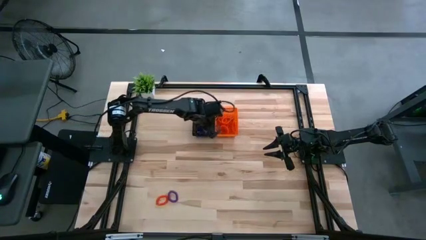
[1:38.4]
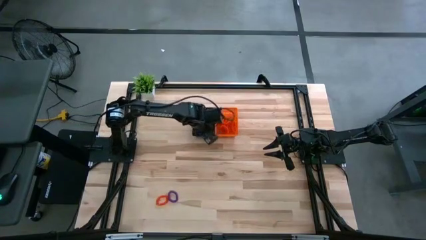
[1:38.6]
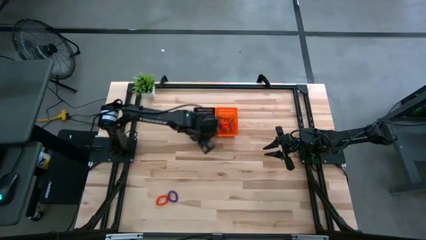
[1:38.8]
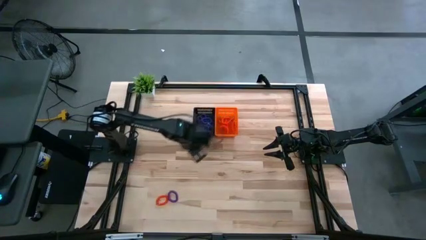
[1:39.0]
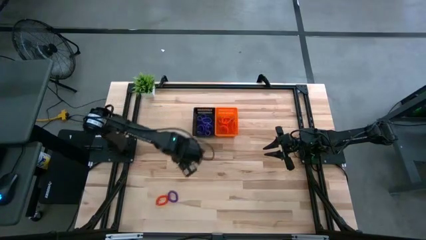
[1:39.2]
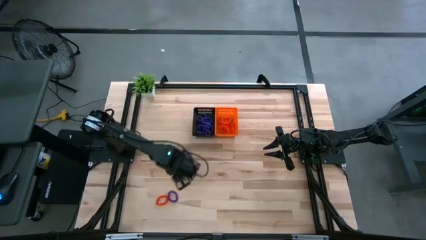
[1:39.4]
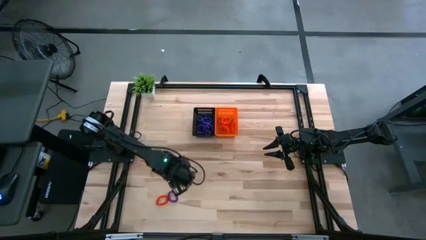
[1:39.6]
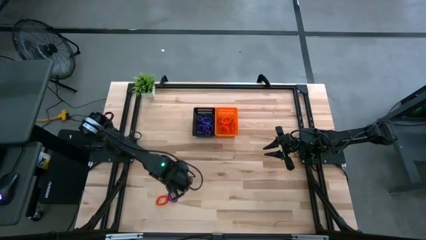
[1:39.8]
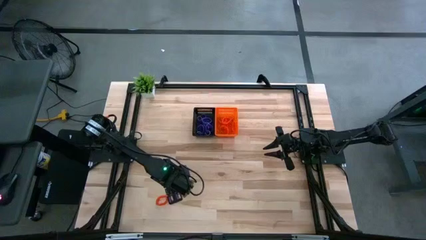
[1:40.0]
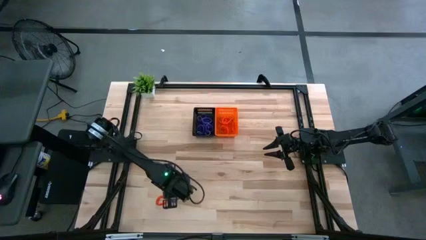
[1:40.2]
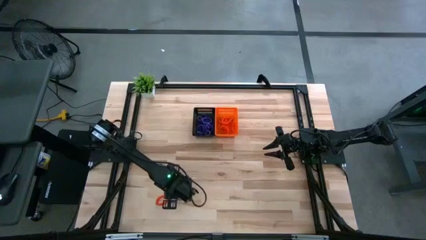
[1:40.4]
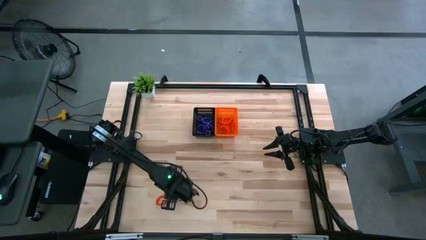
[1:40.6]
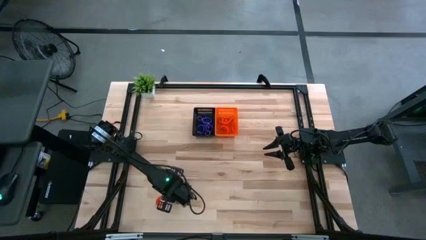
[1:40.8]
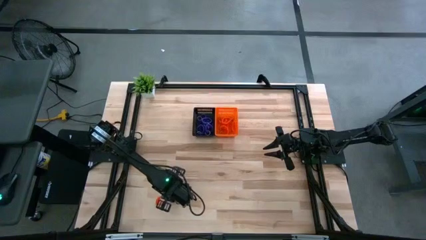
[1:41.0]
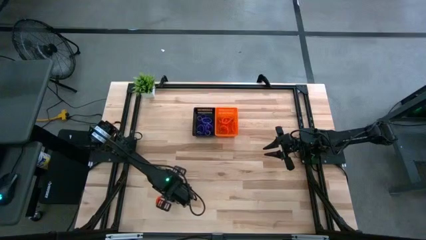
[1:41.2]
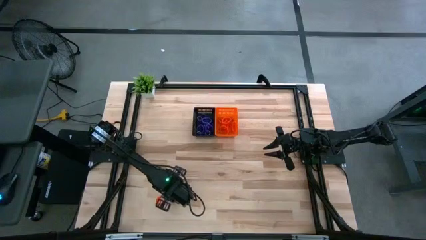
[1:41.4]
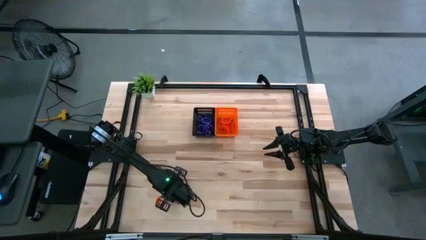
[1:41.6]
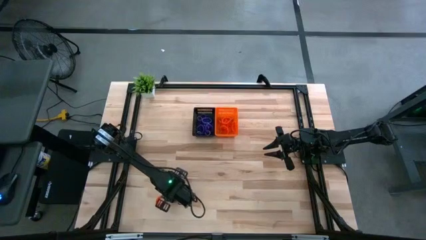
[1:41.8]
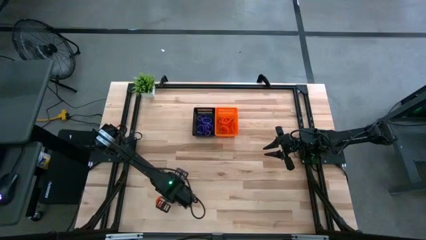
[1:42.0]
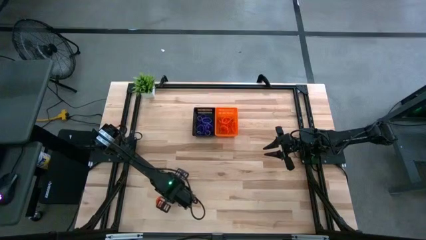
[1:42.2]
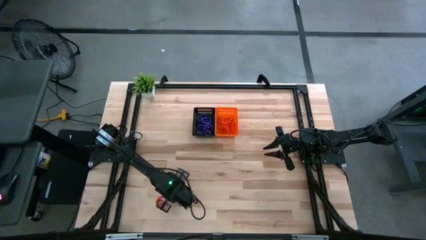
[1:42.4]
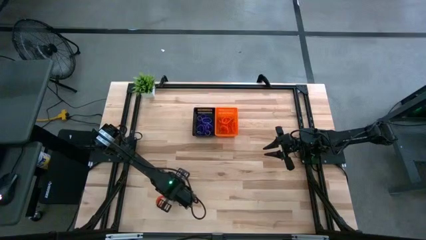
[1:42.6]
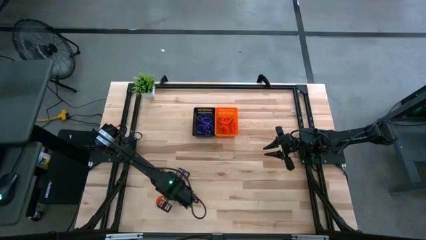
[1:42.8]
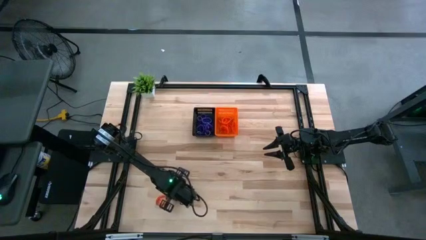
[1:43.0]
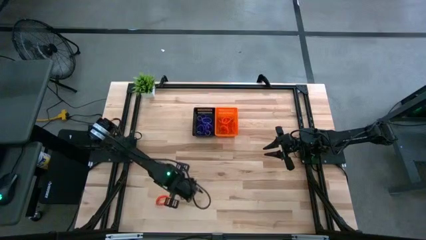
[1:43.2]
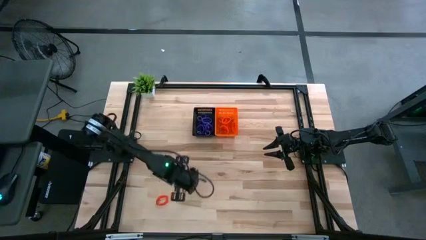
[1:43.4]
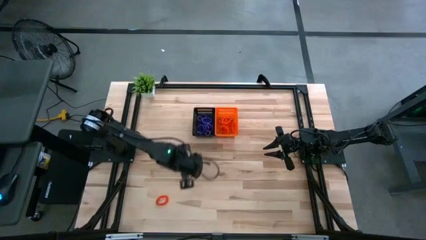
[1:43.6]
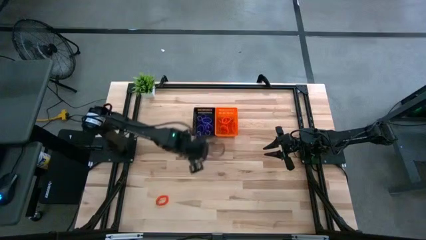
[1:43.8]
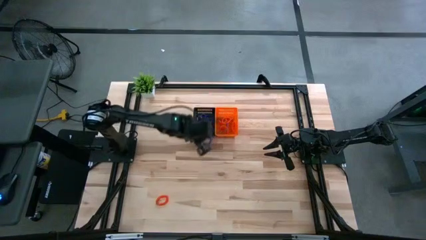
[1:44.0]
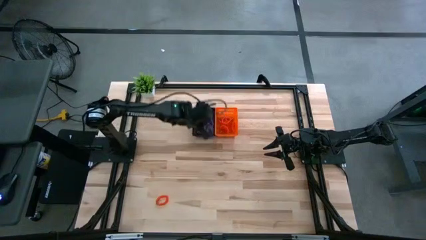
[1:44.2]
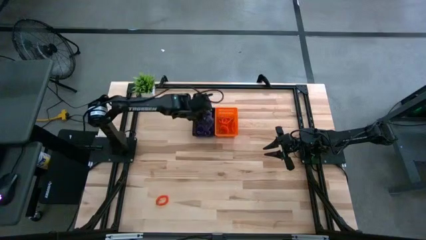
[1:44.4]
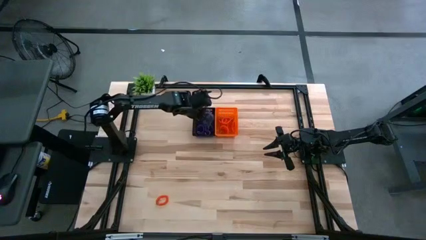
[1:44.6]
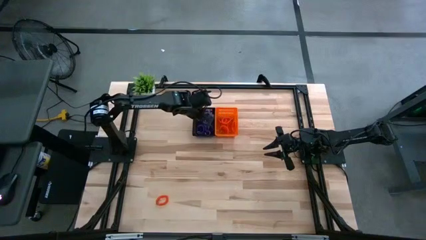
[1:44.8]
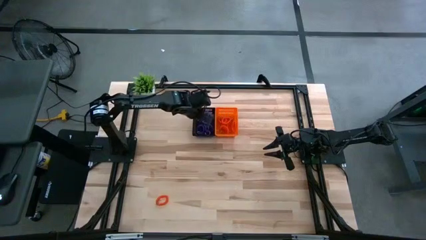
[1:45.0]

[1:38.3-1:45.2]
Task: Sort spring keychains into baskets
Put the purple spring keychain into the black basket

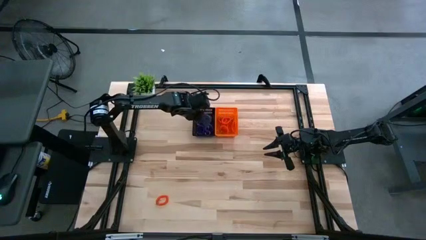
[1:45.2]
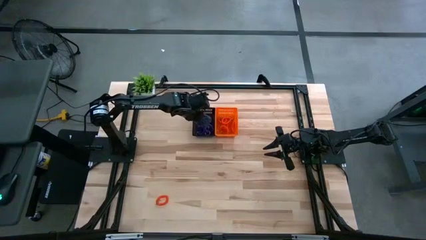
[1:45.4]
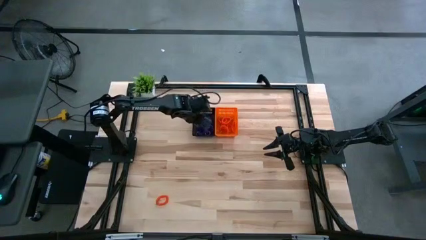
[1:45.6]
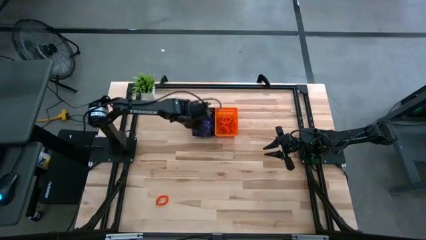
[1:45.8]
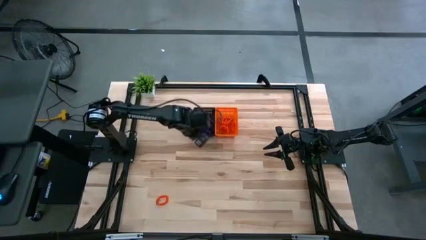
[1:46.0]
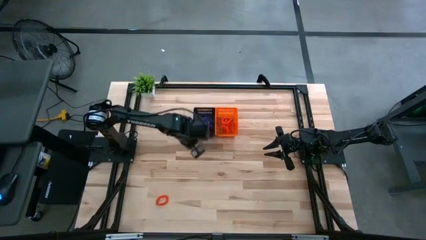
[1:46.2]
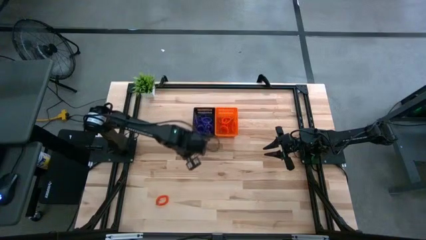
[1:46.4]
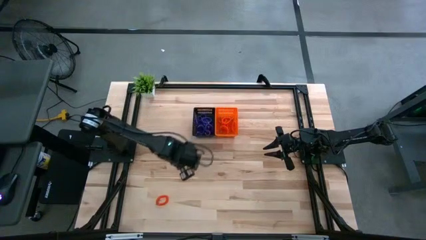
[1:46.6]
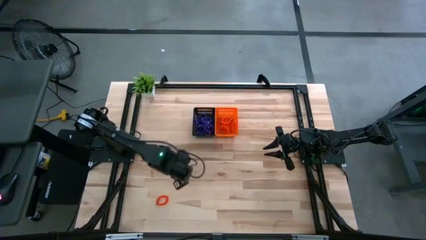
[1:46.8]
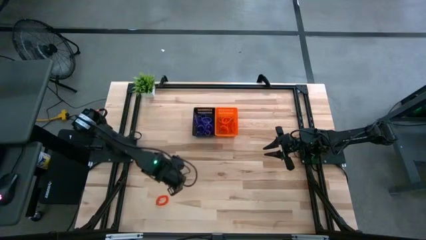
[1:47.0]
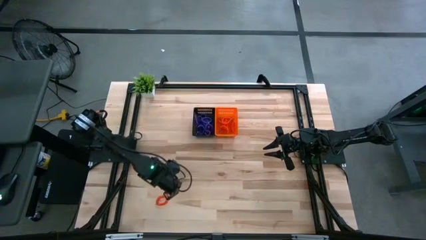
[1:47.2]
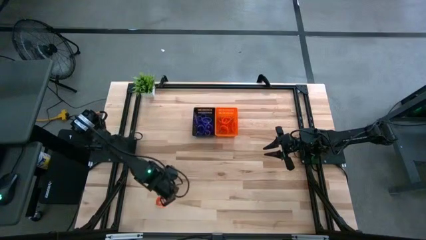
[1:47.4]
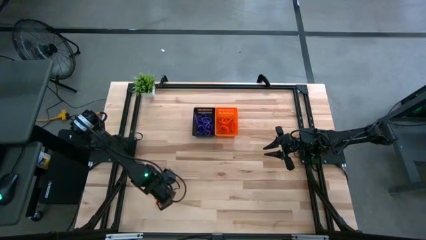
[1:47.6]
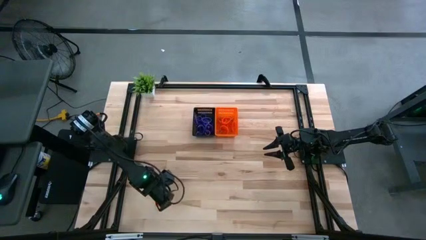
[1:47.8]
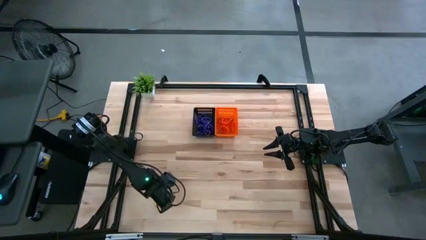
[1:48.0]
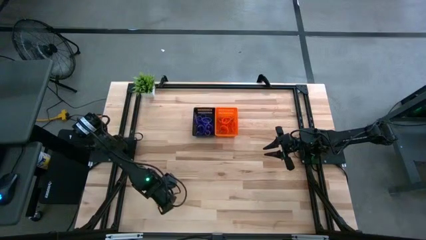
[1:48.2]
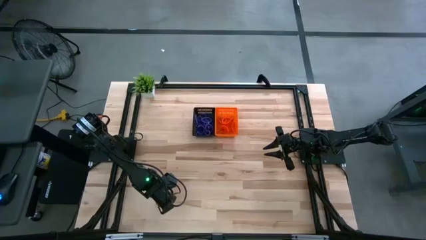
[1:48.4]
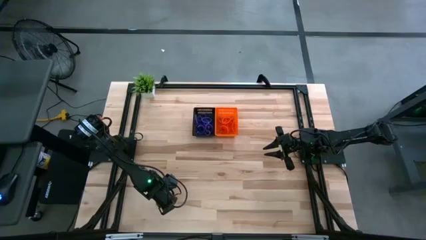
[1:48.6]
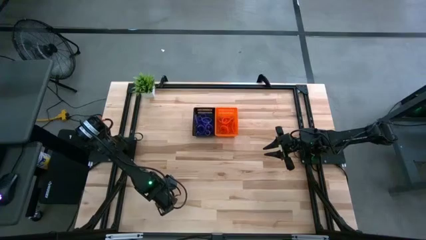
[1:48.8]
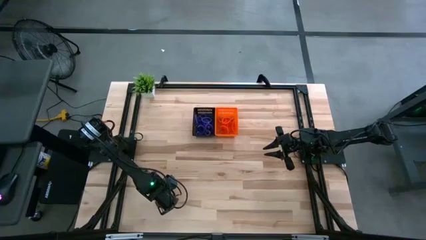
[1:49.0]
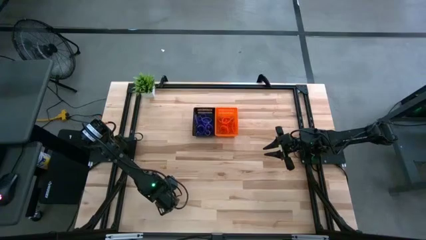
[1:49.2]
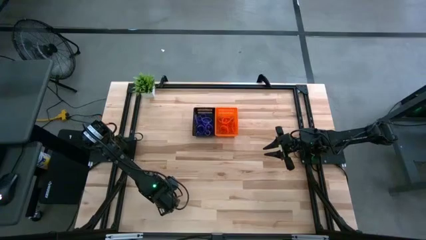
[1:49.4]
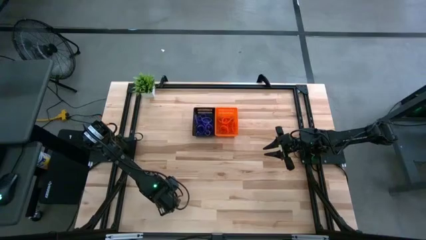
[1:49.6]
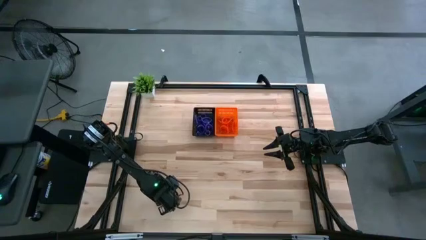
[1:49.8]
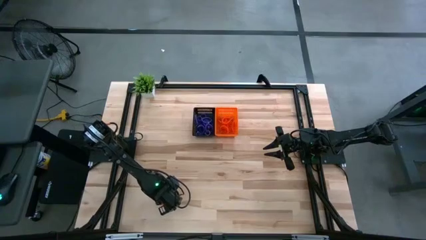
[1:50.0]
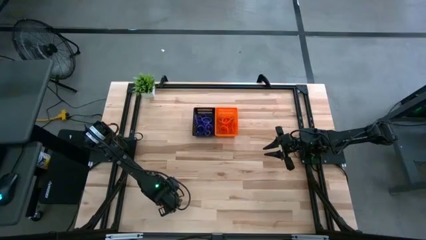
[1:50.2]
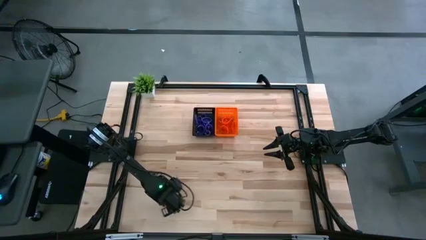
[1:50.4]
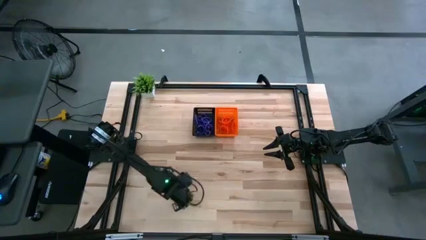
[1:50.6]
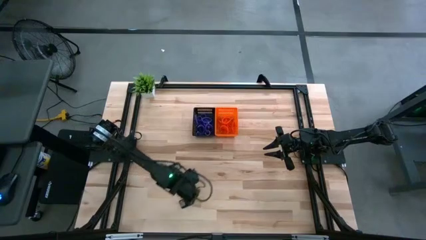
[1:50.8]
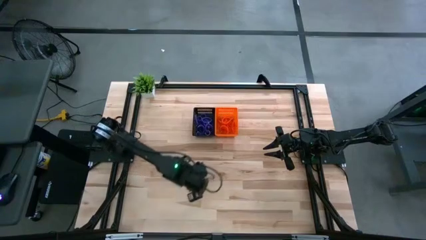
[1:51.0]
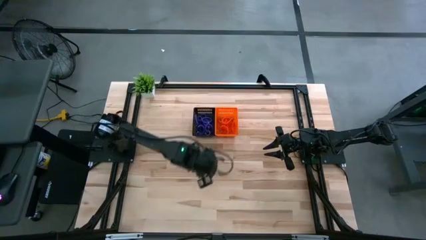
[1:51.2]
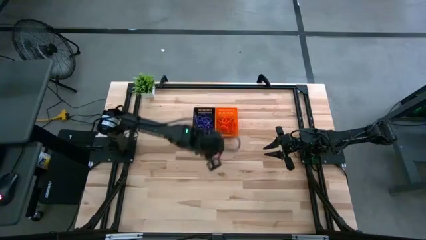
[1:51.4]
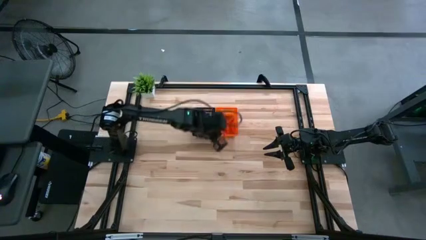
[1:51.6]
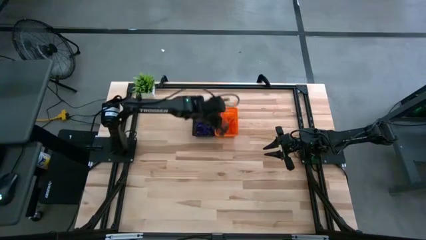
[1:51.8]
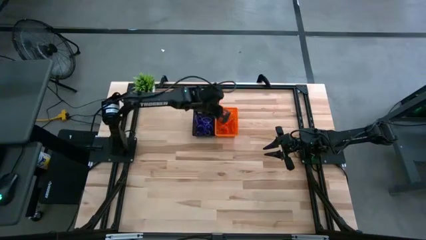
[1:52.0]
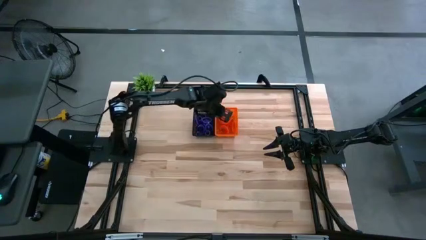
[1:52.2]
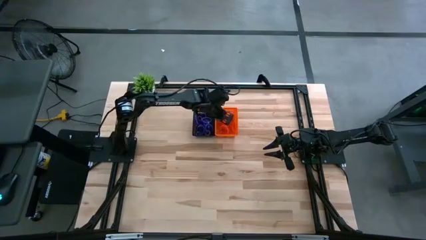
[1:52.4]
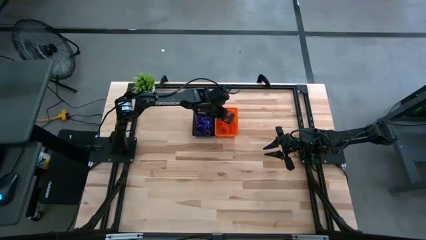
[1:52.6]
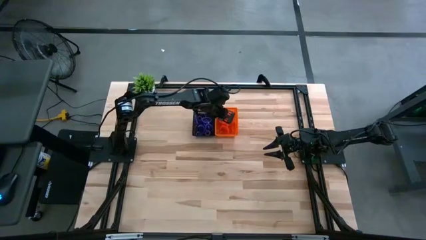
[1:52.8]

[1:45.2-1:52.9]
Put the orange spring keychain into the orange basket

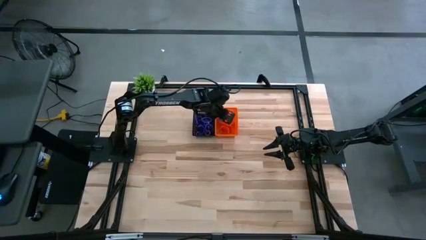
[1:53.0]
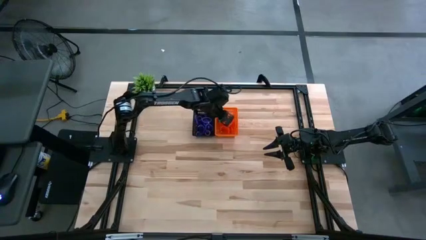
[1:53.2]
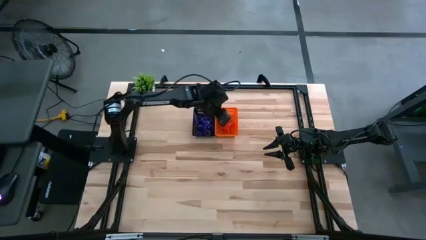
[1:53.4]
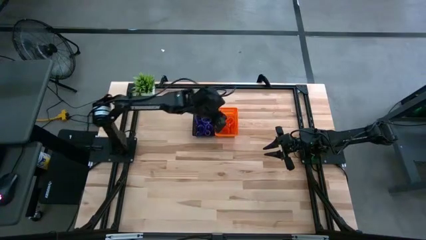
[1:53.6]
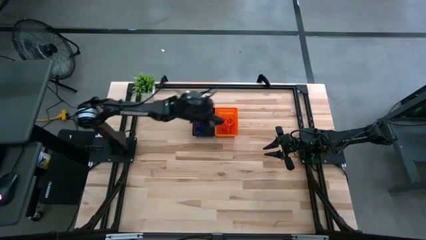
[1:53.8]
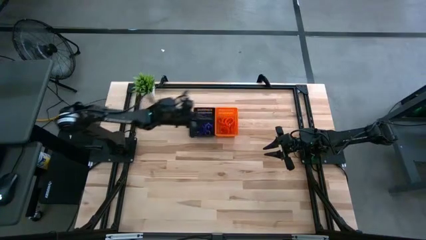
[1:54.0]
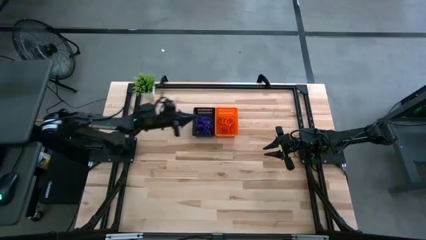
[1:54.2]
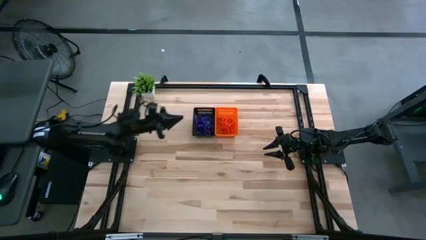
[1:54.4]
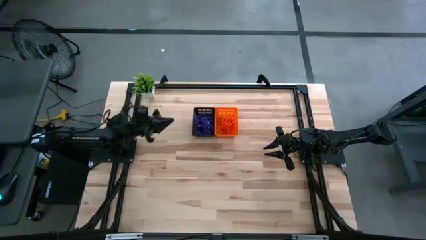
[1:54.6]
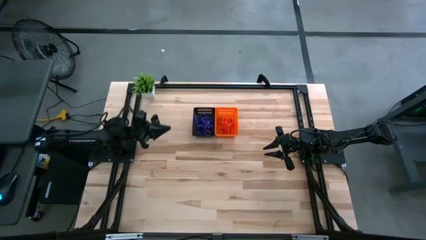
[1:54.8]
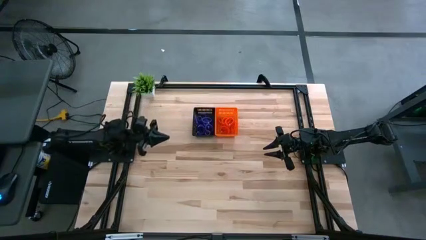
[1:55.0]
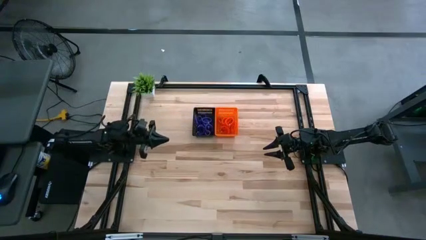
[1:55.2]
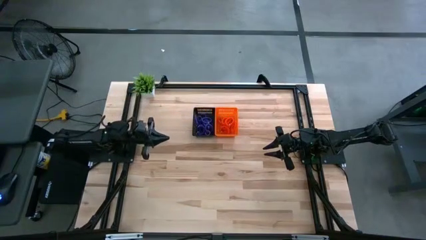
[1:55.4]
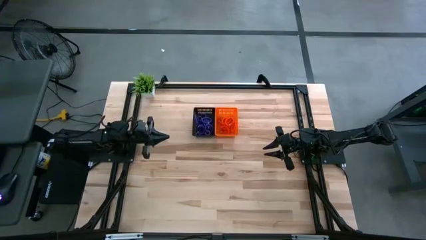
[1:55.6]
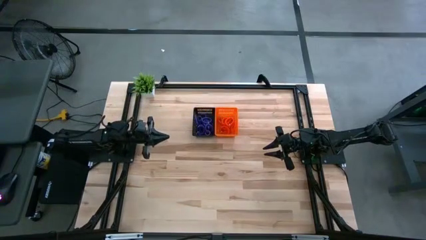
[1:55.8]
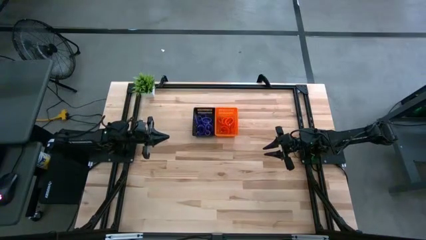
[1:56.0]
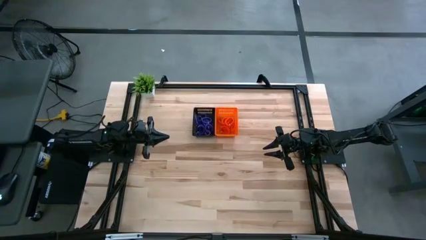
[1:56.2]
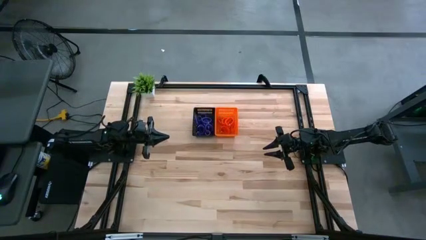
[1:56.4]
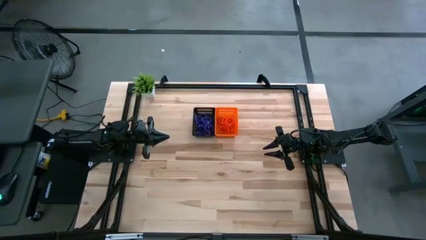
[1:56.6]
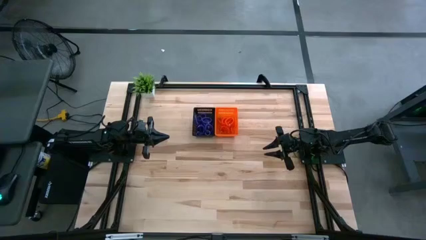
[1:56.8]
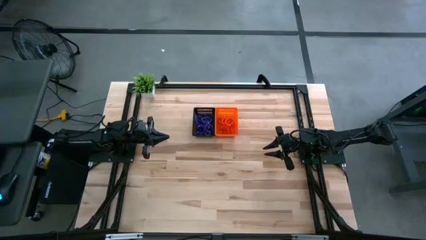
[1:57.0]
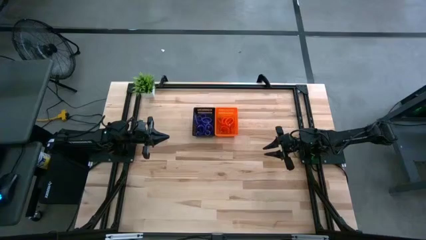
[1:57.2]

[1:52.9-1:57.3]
Return to Home Position
